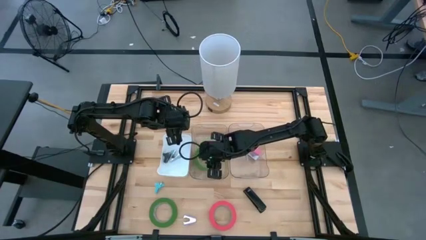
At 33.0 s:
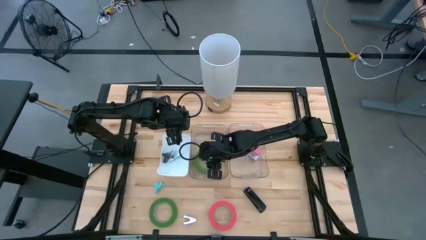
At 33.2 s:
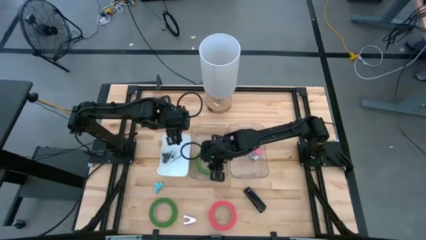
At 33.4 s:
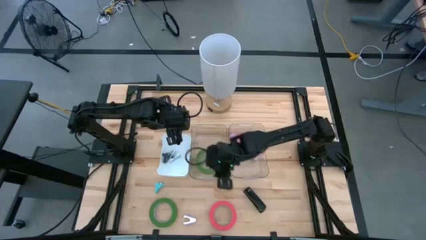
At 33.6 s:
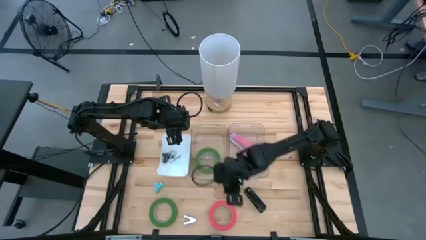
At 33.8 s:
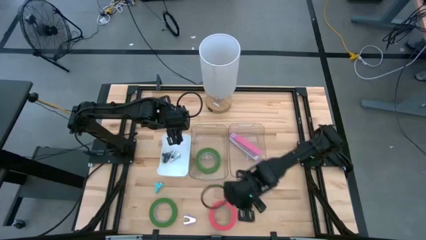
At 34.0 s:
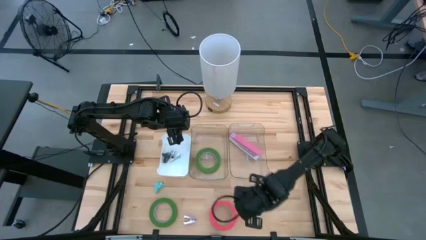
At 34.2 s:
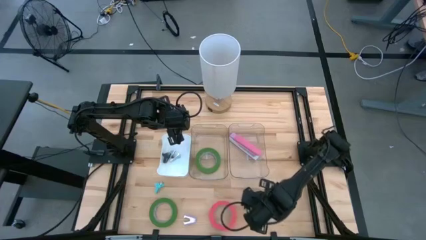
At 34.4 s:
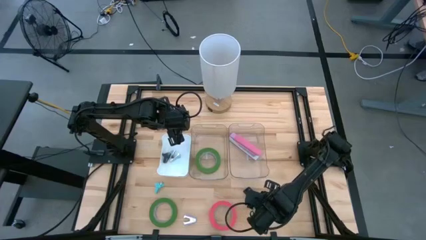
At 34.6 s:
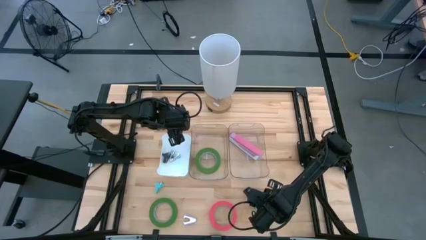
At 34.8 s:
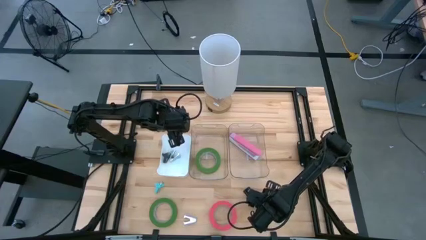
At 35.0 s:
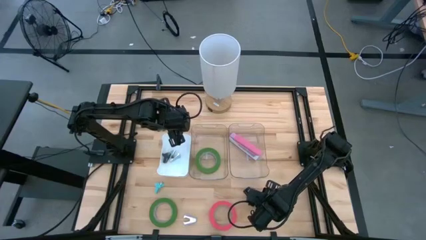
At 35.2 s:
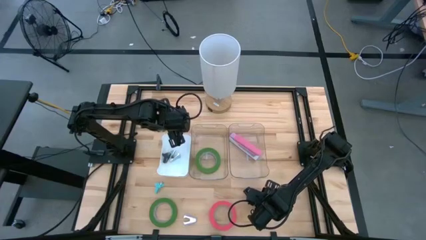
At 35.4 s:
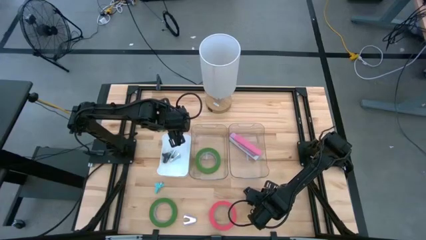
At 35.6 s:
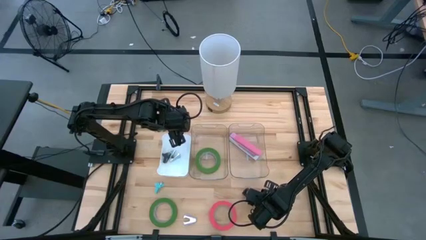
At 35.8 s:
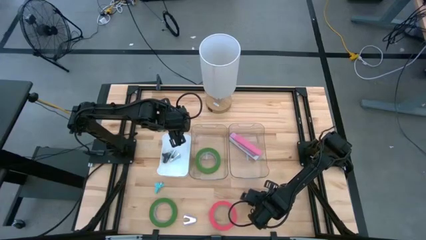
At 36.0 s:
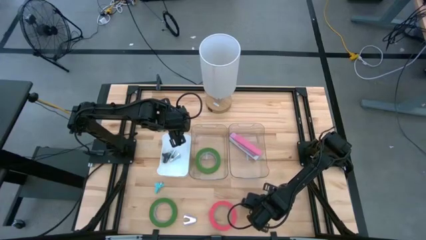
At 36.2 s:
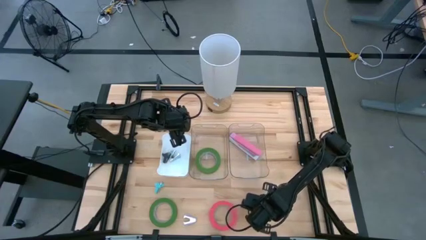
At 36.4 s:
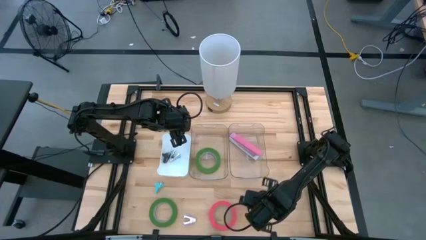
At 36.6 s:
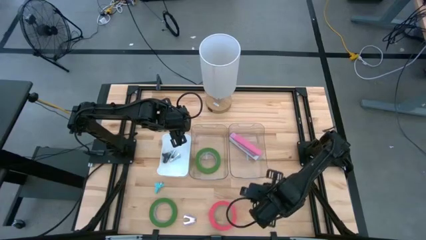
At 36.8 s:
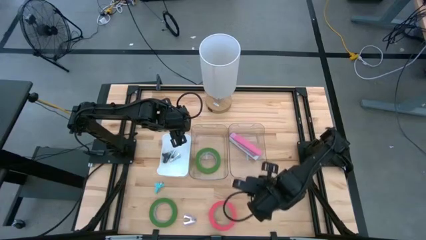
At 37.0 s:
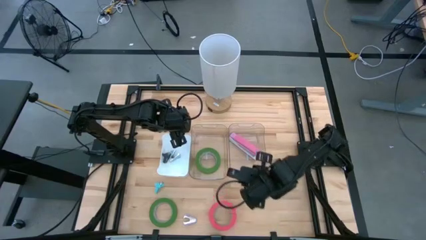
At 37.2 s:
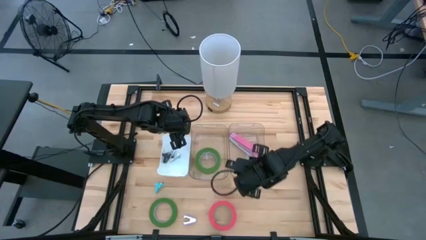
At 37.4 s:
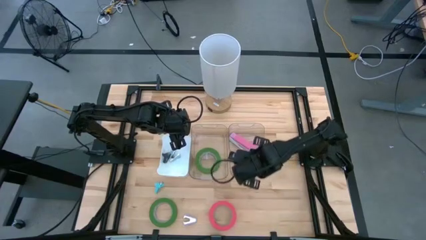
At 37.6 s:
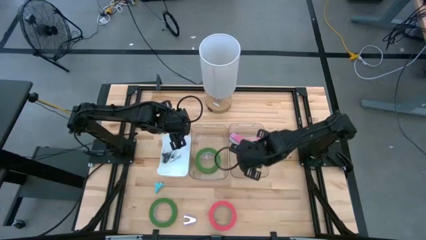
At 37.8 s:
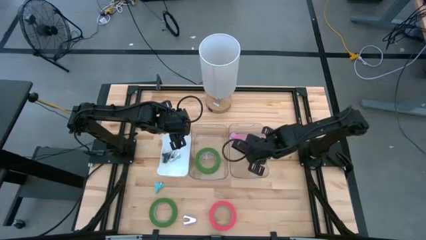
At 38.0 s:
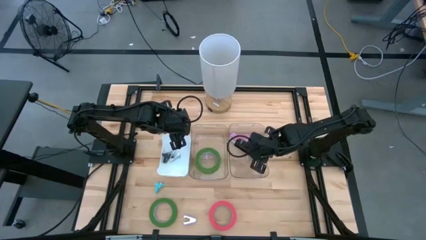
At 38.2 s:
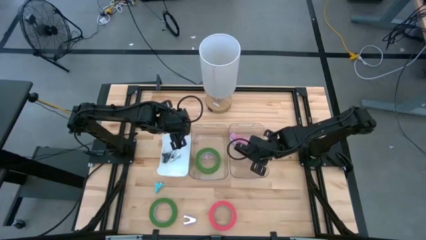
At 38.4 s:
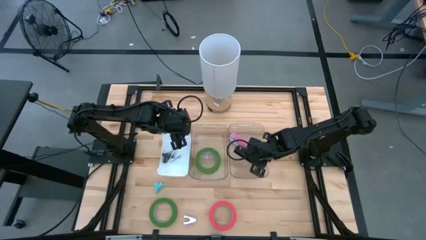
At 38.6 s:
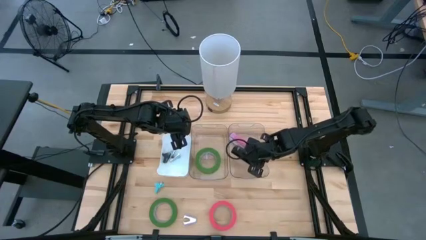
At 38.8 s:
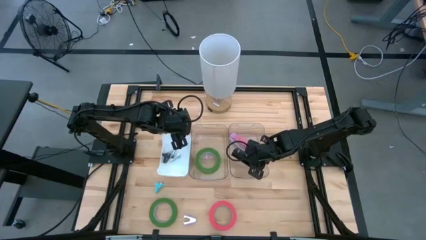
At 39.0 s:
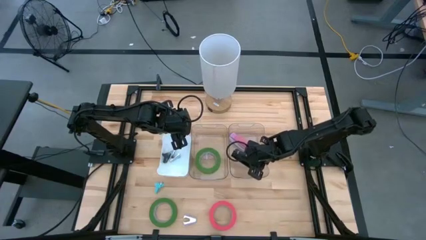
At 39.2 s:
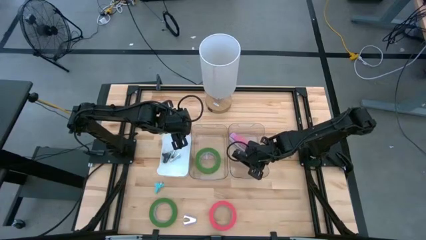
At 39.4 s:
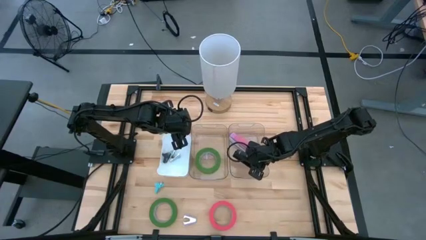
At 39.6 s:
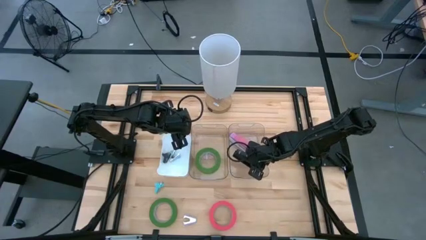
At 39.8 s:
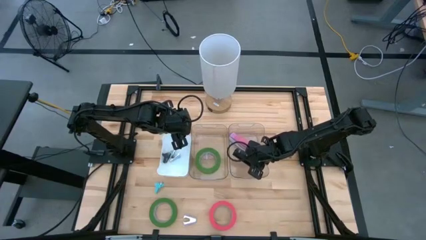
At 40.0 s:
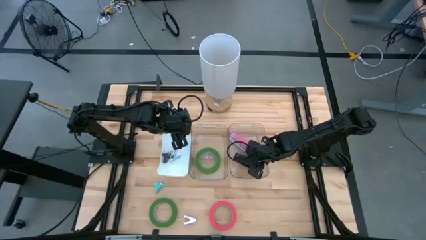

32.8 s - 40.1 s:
Task: Pick and place Stapler, Stapler remover, tape
Put the black stapler into the right transparent bin

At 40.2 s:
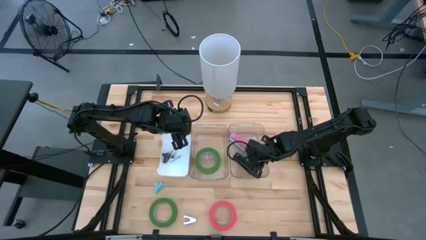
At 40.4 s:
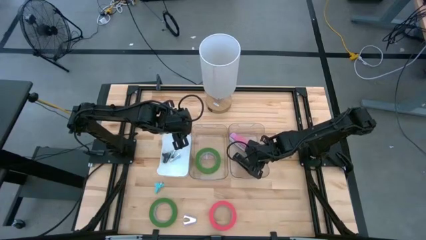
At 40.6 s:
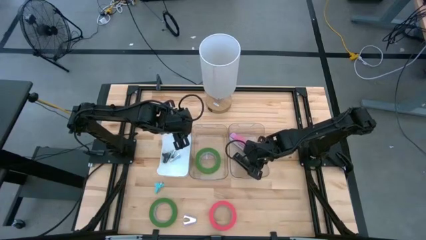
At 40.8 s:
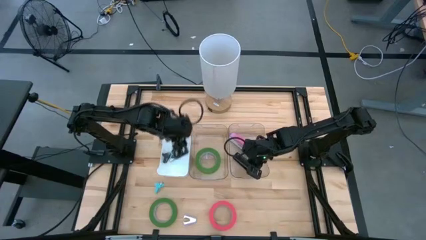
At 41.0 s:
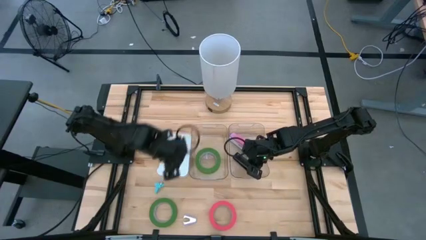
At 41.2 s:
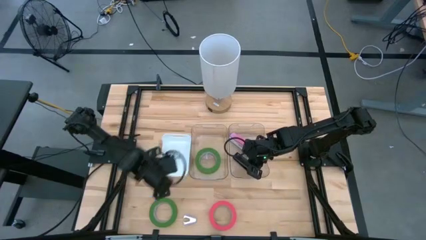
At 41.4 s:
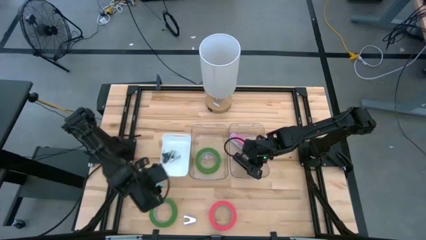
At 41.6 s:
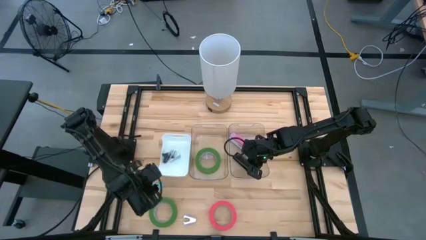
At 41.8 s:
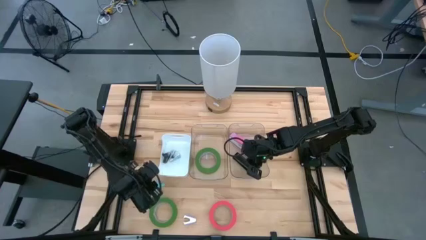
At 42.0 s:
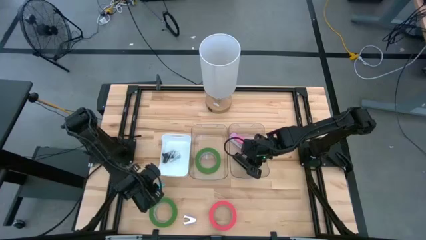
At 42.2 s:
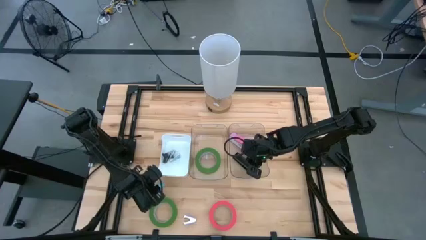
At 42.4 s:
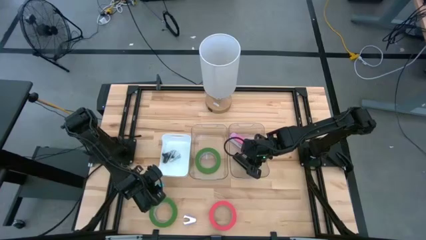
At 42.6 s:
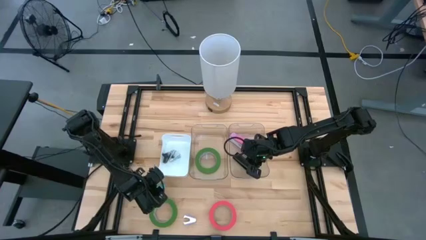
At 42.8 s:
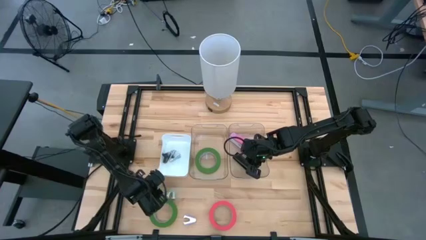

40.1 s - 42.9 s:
Put the blue staple remover into the white bin

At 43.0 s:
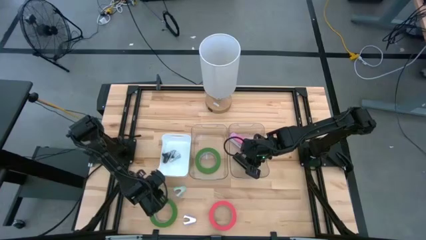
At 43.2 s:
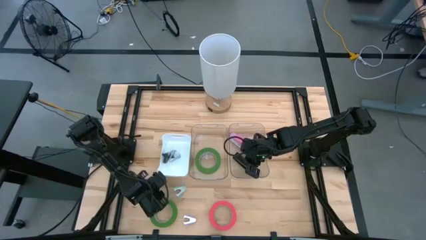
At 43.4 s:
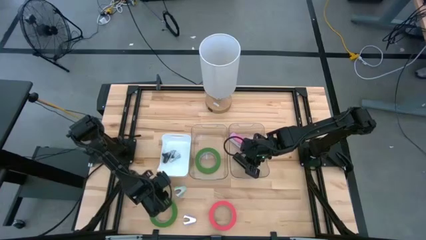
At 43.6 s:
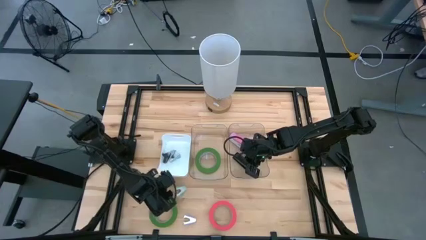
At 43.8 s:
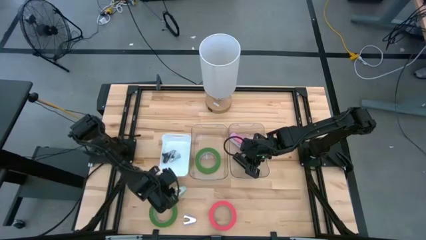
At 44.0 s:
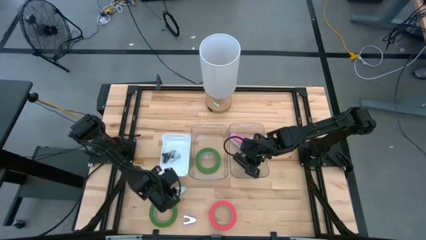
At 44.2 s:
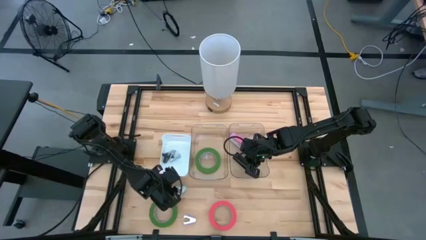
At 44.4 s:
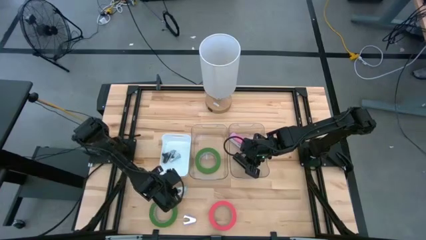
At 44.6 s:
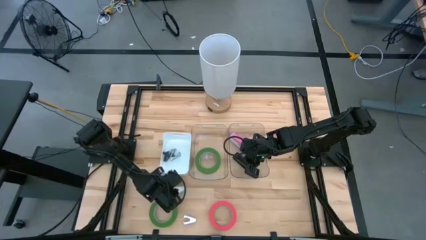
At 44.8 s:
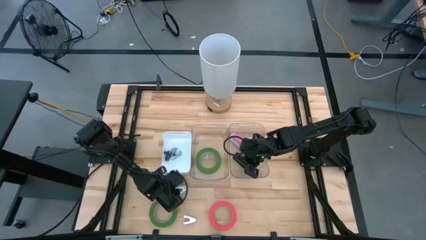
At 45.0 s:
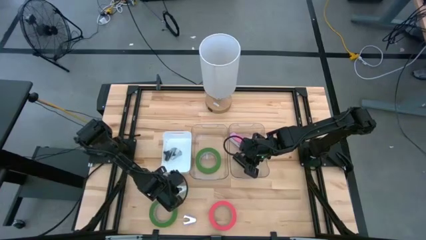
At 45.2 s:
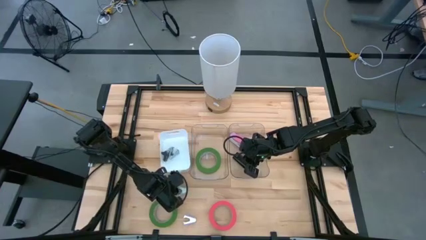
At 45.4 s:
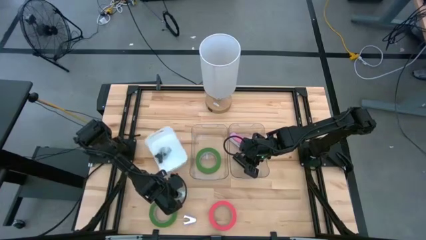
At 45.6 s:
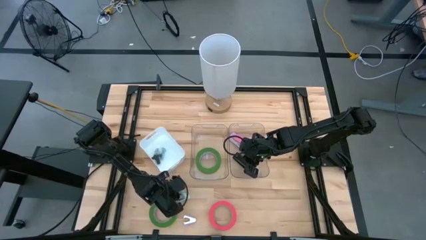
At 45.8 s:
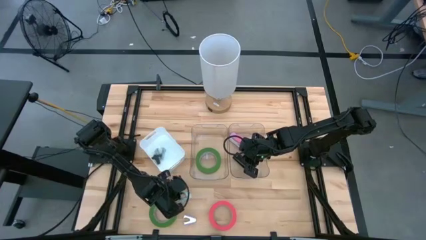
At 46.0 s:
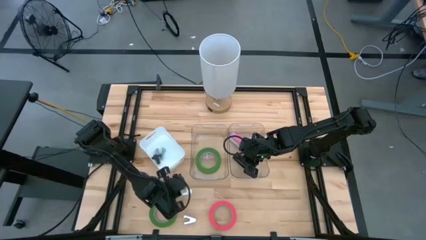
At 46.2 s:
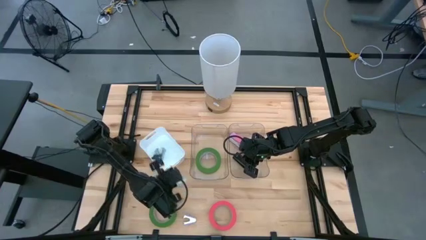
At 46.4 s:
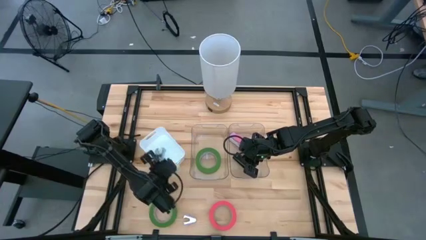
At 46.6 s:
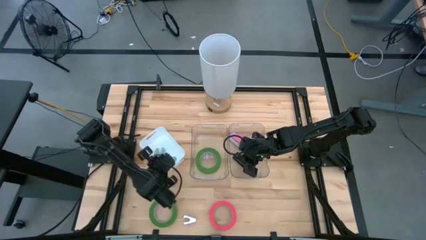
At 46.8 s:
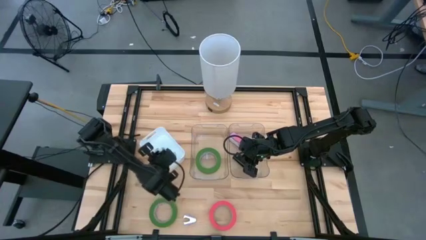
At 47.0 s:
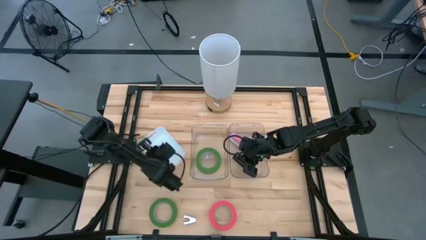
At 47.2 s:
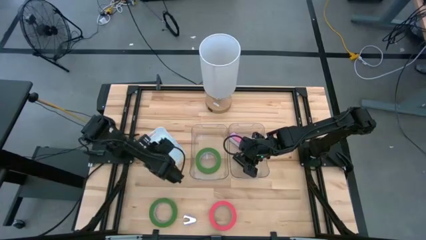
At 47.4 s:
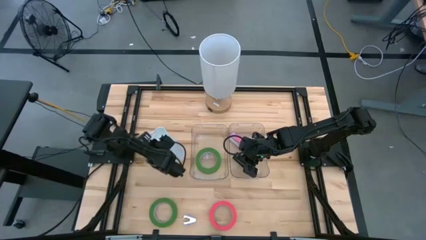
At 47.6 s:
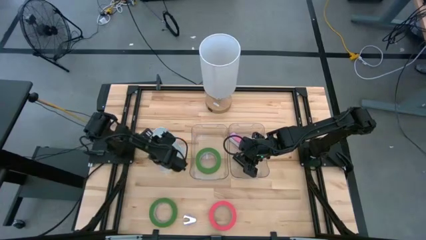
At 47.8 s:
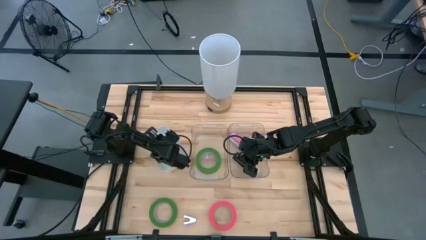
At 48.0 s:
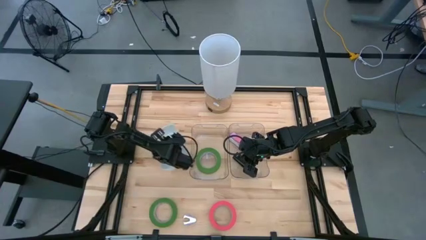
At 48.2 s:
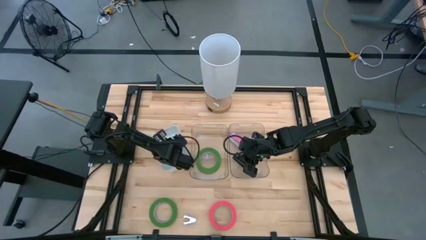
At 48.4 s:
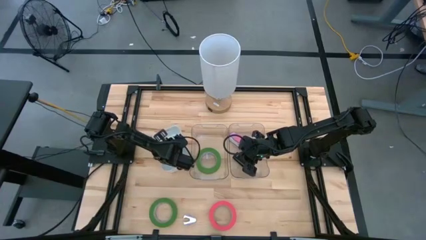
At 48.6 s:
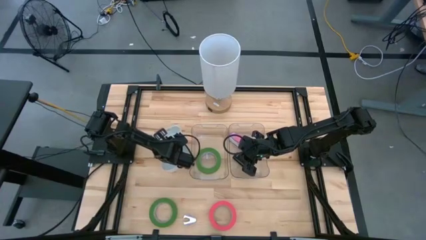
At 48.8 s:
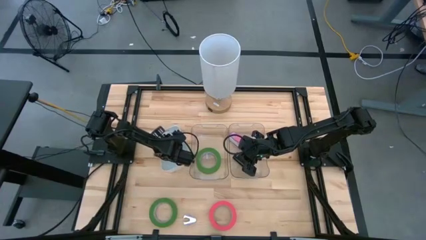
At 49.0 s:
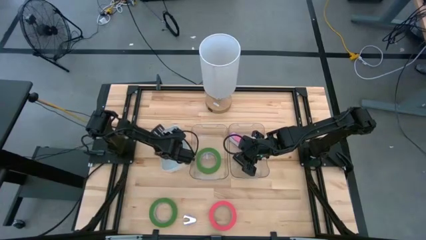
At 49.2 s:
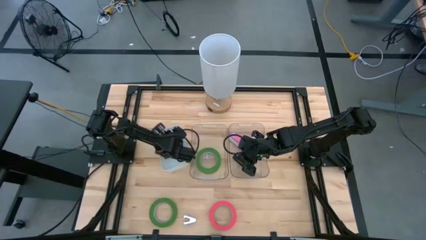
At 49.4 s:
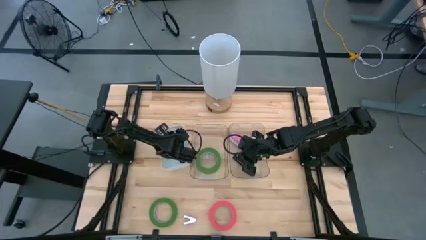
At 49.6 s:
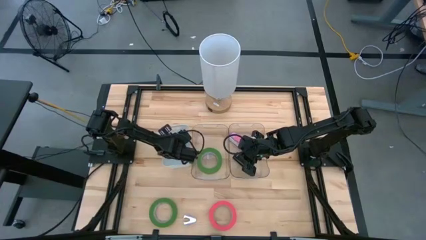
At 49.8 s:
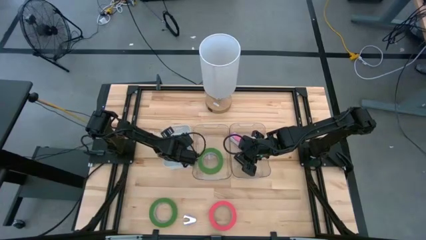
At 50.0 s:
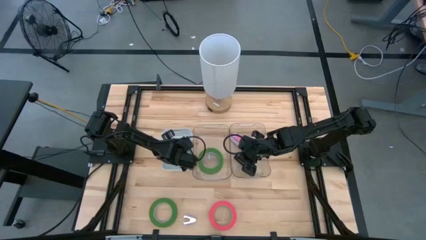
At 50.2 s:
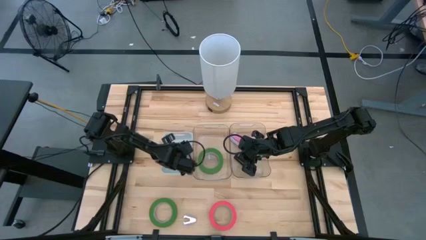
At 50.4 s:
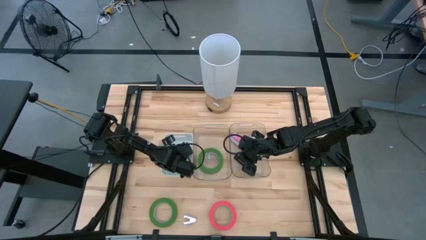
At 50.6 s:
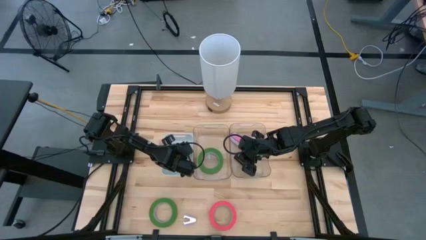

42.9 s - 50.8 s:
Put the blue staple remover into the white bin
